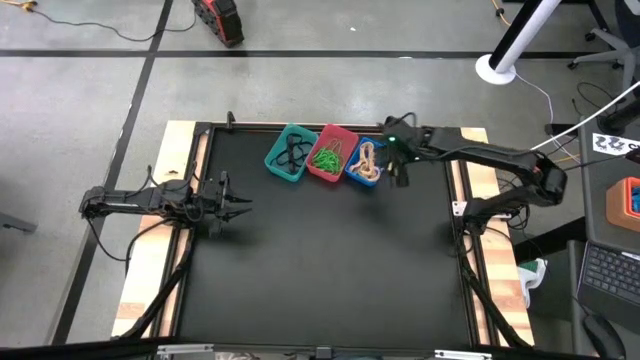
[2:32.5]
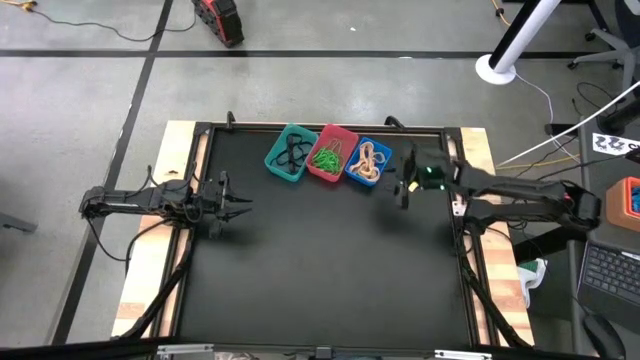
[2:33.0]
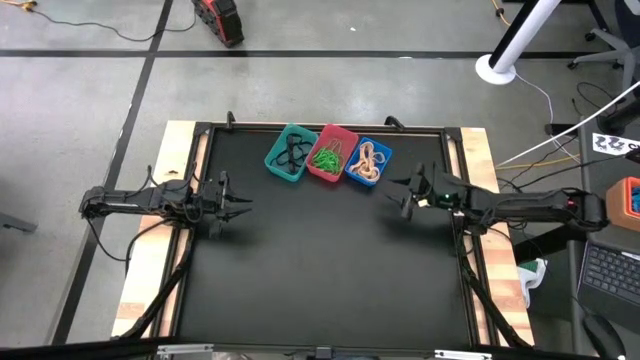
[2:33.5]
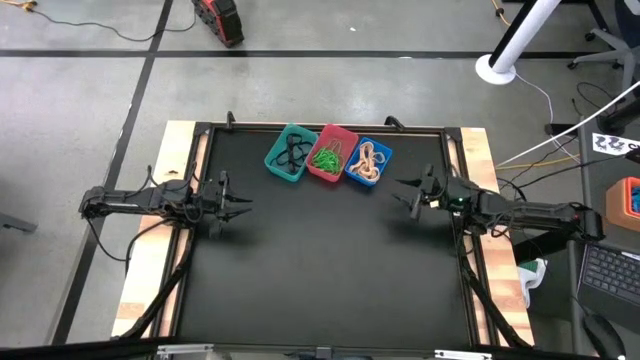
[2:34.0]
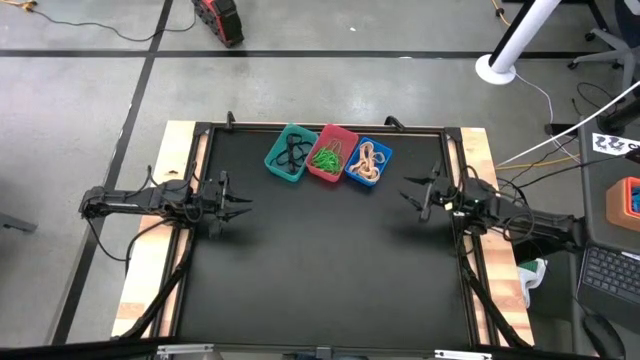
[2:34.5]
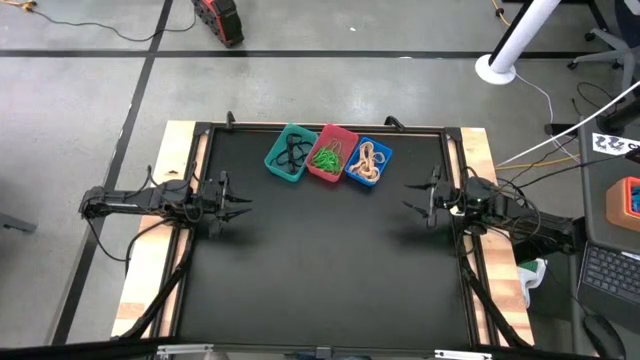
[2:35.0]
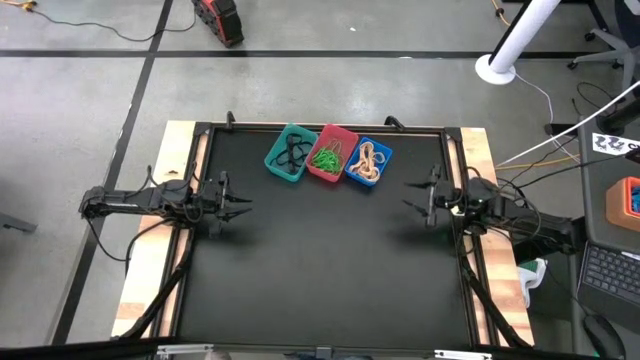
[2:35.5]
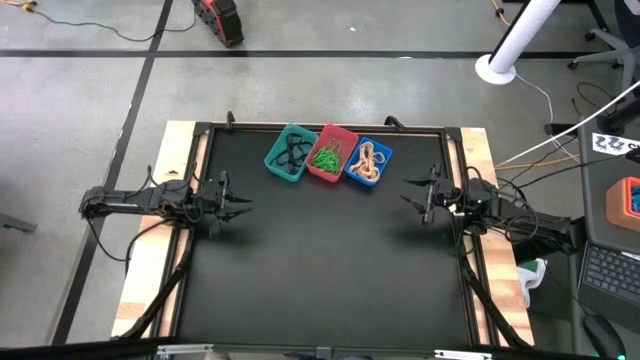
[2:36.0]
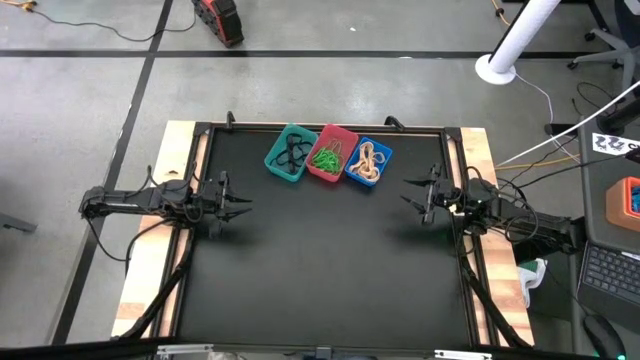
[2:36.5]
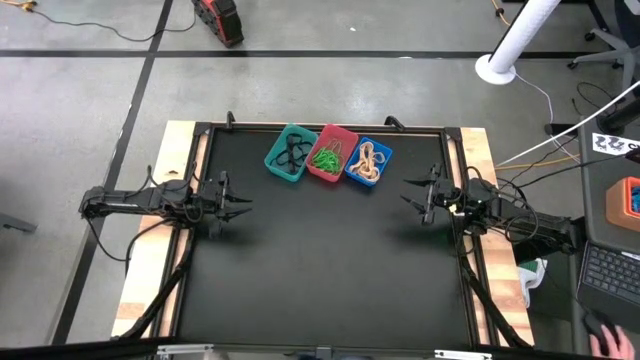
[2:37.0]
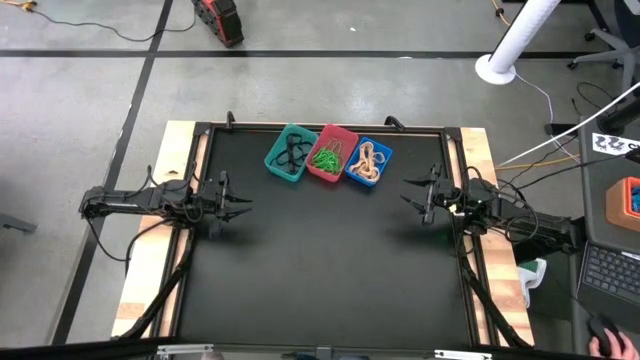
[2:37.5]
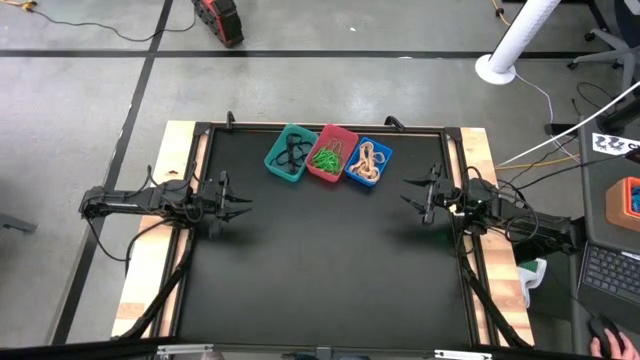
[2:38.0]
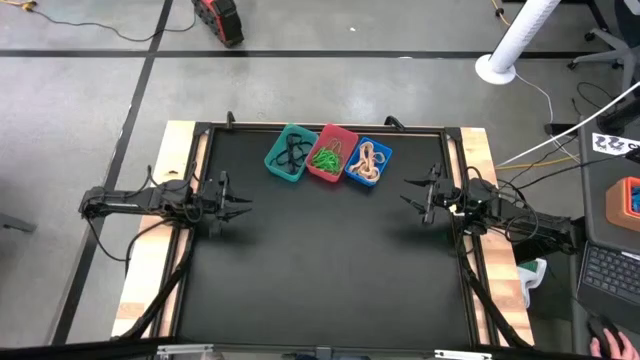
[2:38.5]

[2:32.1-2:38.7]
Task: Sort rubber bands into baskets
Return to Home Position

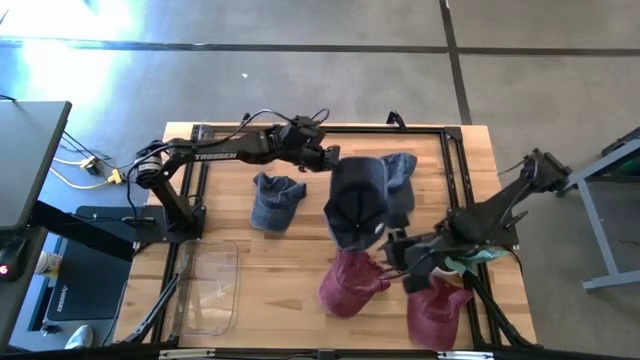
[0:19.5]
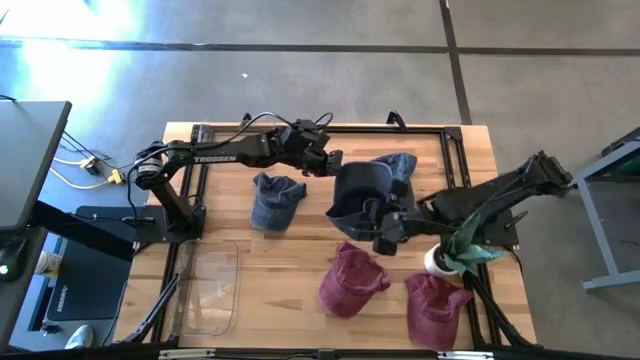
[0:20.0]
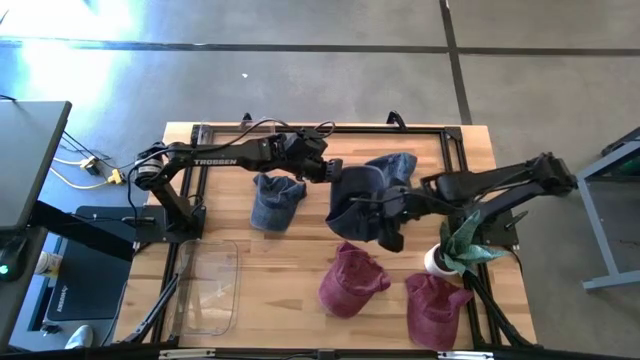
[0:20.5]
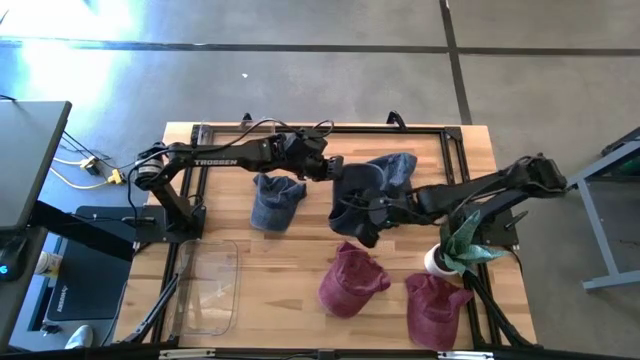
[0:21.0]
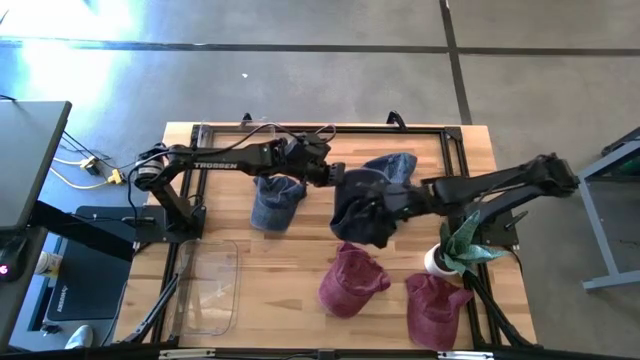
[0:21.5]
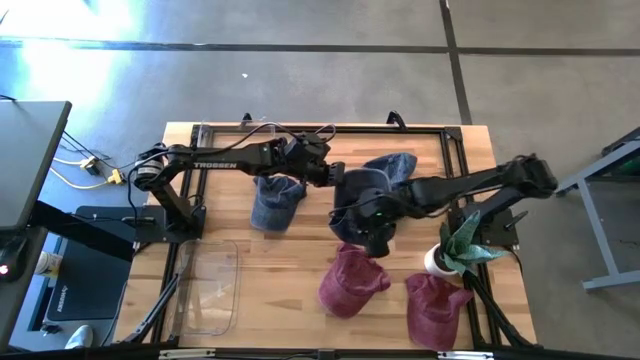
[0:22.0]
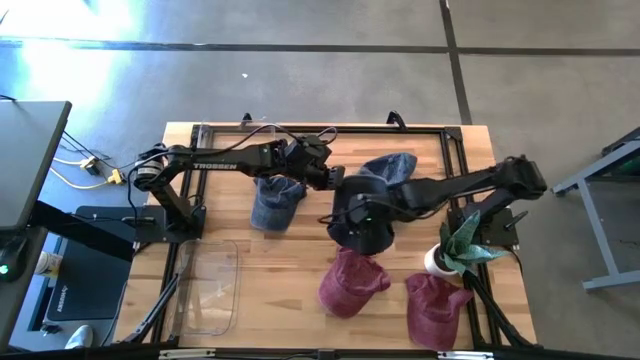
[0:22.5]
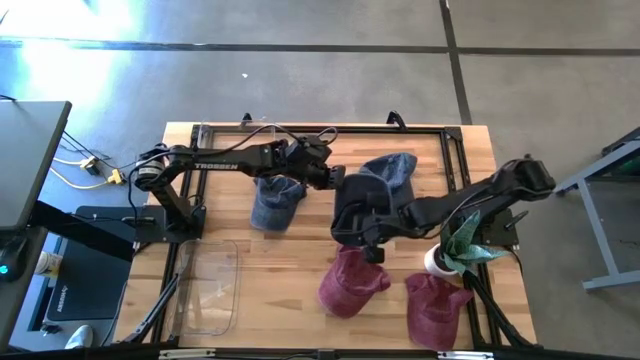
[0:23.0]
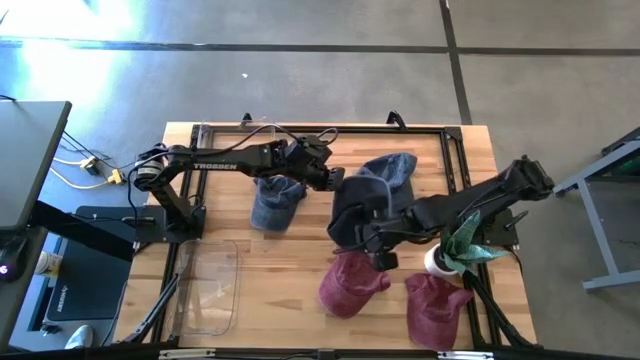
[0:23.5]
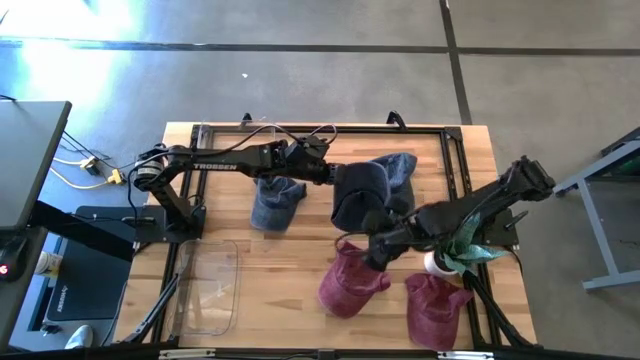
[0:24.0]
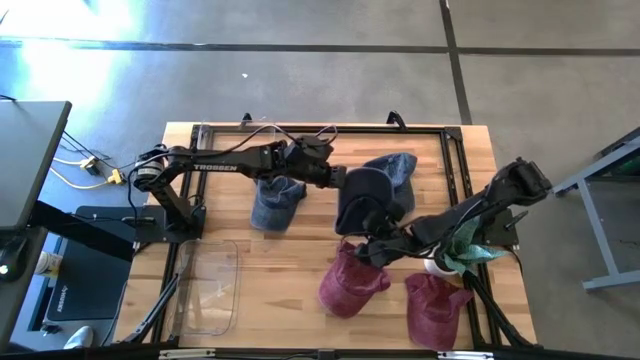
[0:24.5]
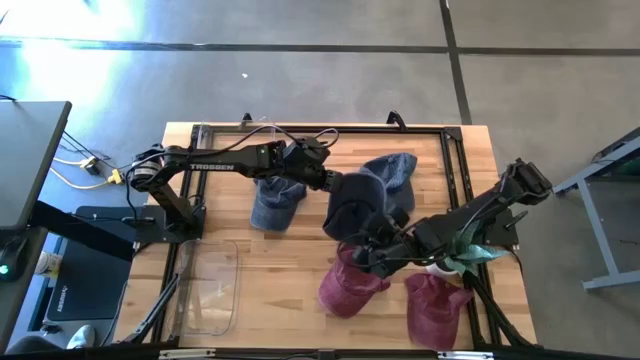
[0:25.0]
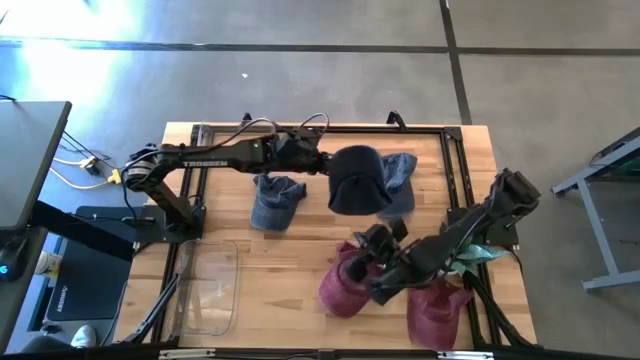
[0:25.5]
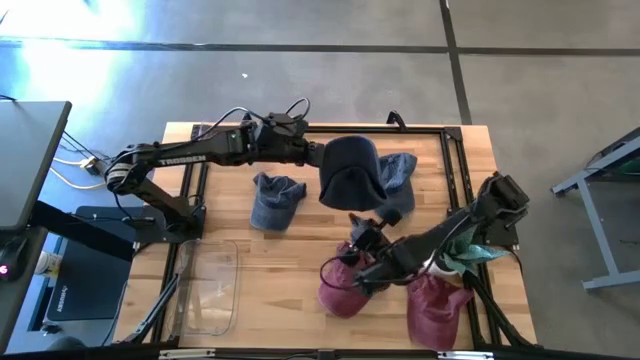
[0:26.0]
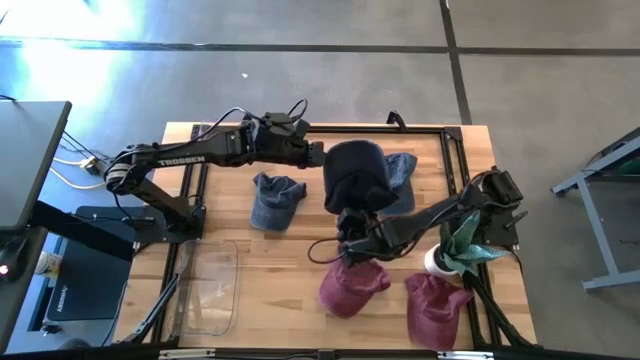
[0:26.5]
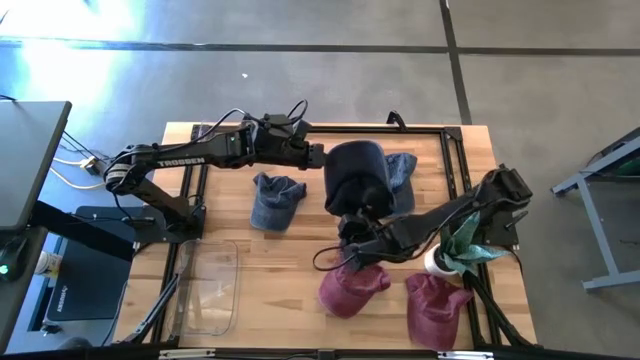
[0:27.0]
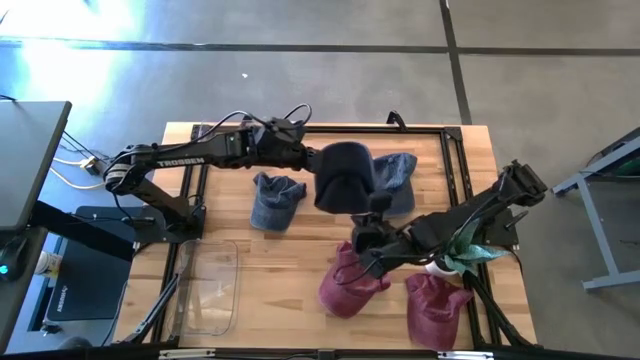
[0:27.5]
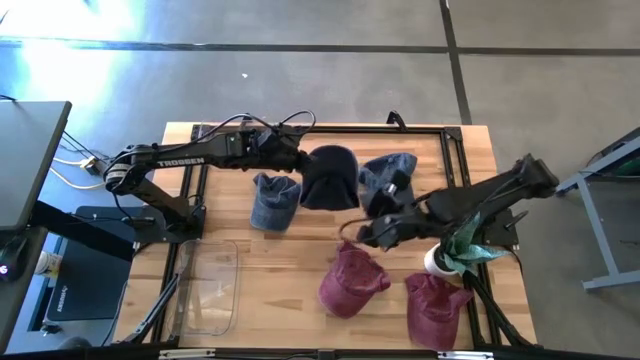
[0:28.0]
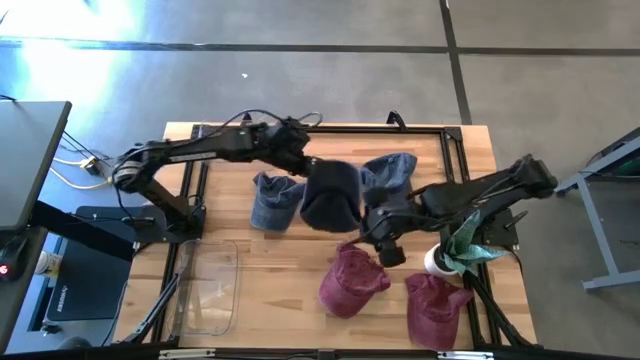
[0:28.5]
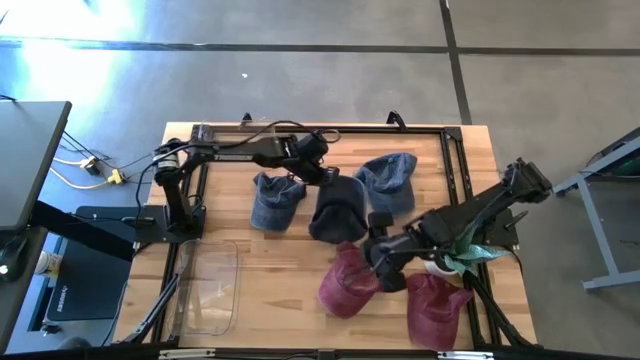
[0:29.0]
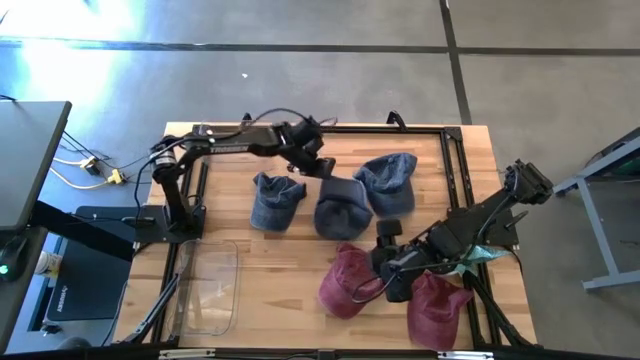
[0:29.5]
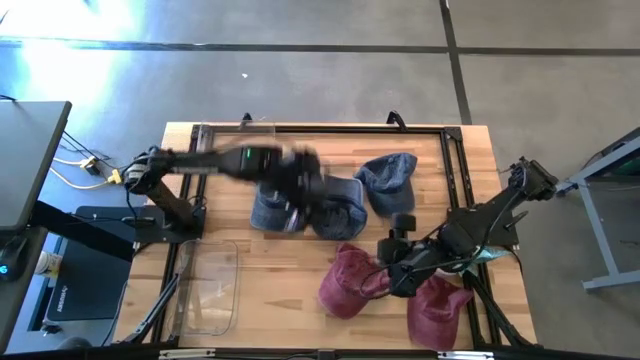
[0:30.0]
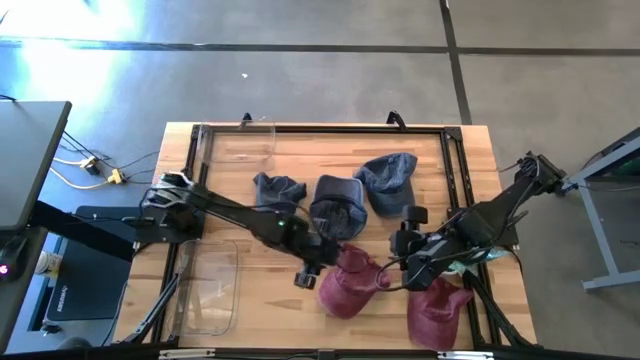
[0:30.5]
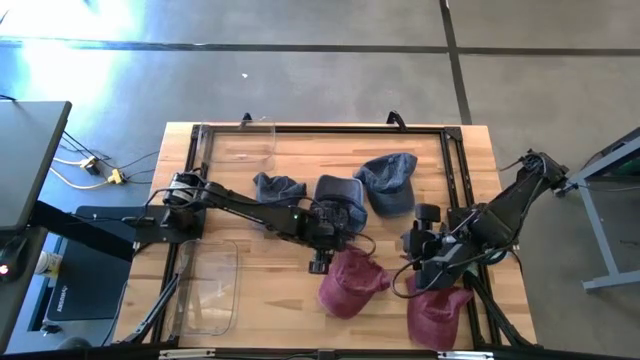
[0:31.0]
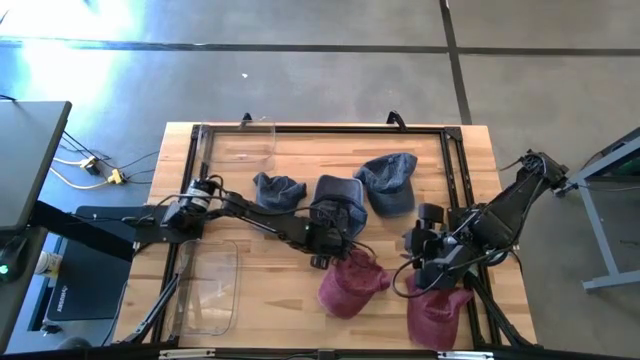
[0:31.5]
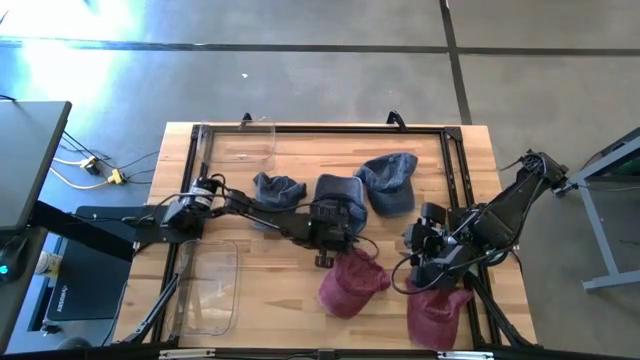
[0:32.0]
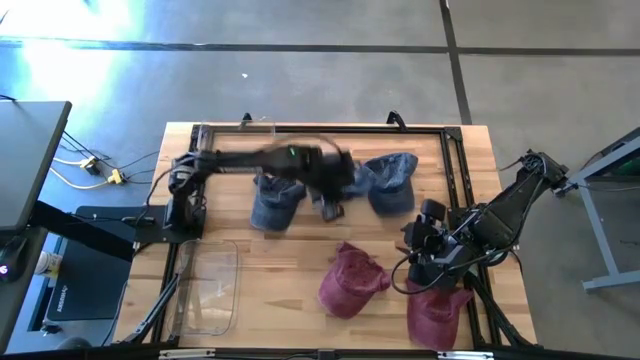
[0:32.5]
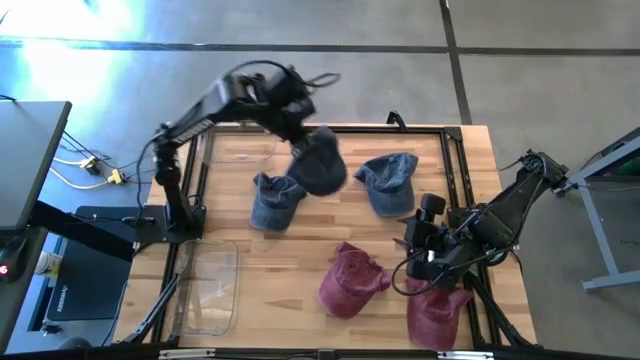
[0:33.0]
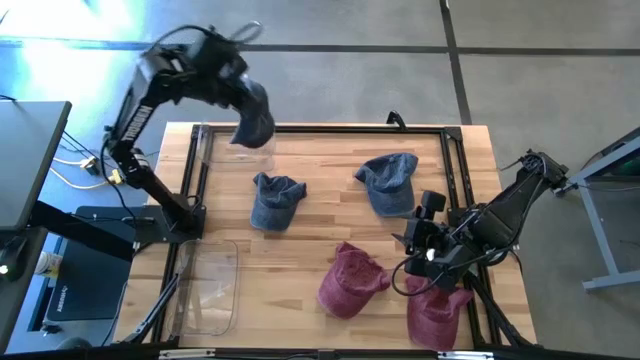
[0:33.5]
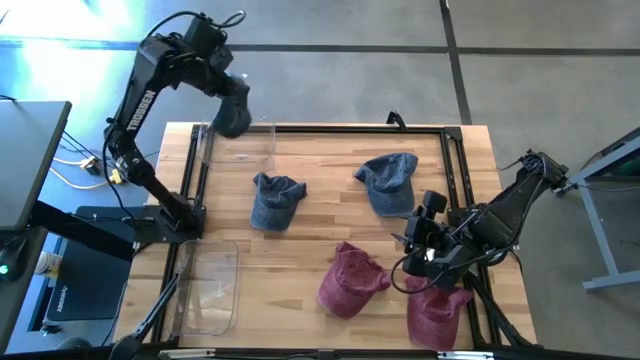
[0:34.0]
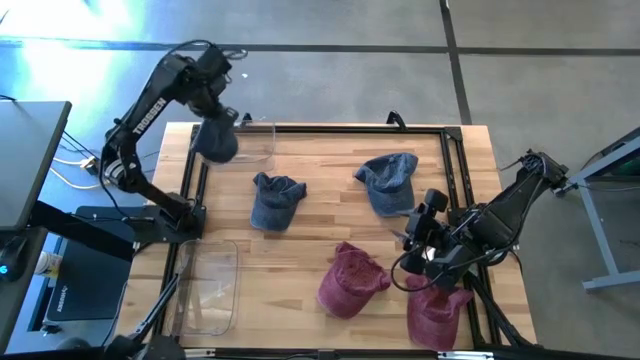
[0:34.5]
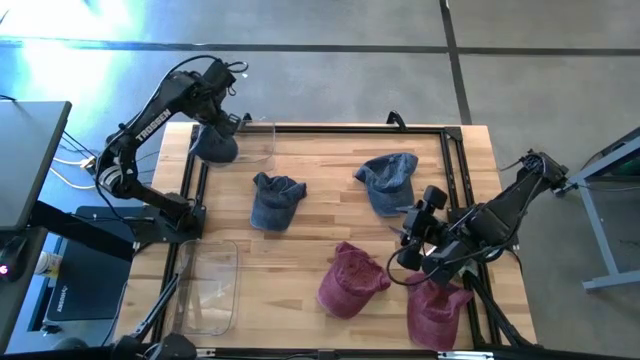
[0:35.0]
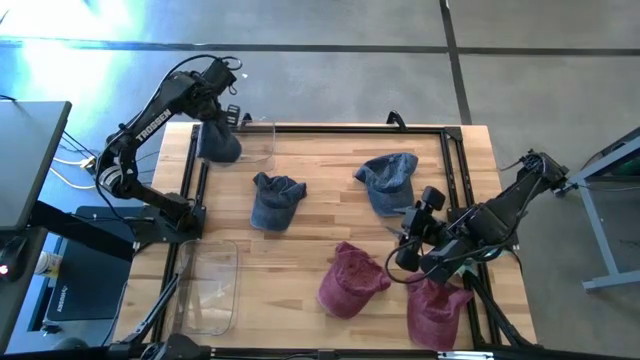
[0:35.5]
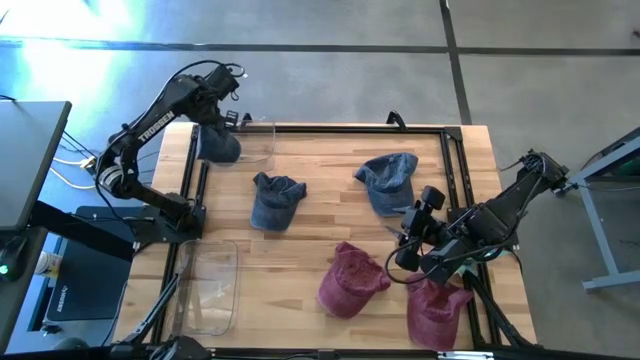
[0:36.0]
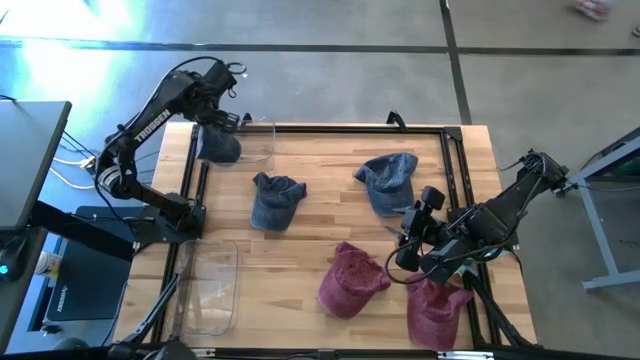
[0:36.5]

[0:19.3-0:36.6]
Task: Pick & Place hat
Put the bottom blue cap into the top transparent bin
